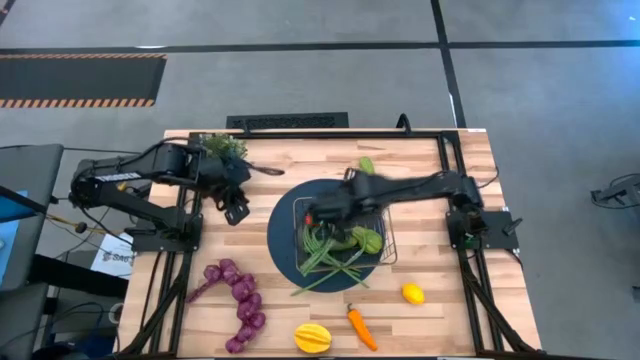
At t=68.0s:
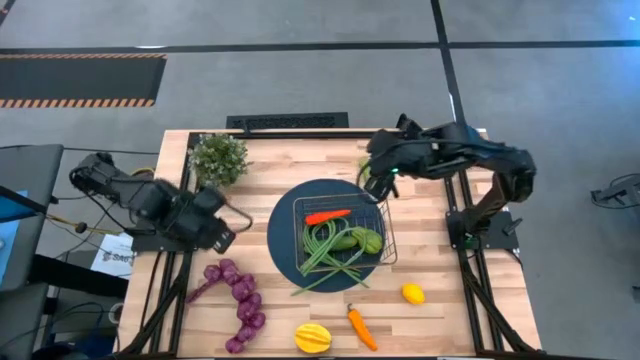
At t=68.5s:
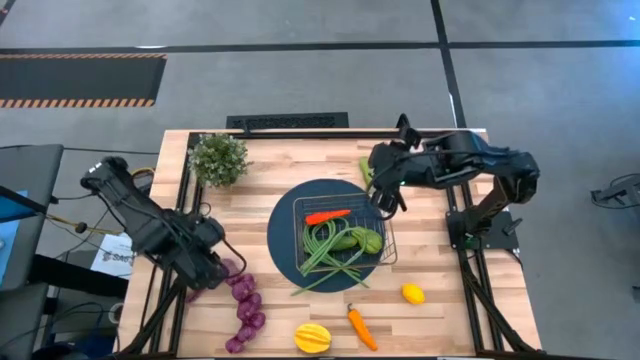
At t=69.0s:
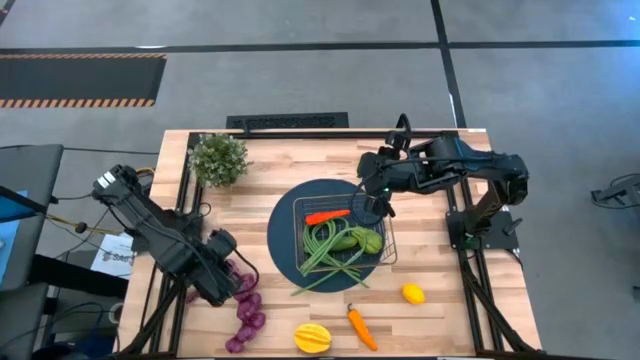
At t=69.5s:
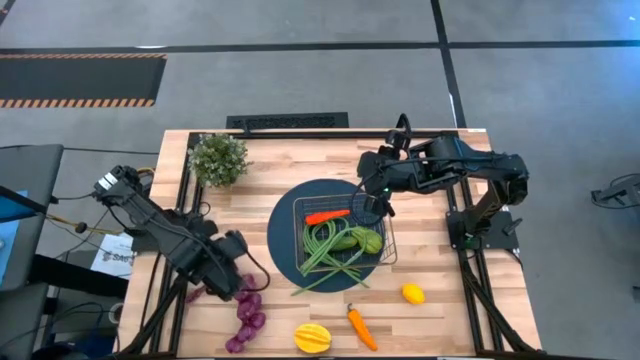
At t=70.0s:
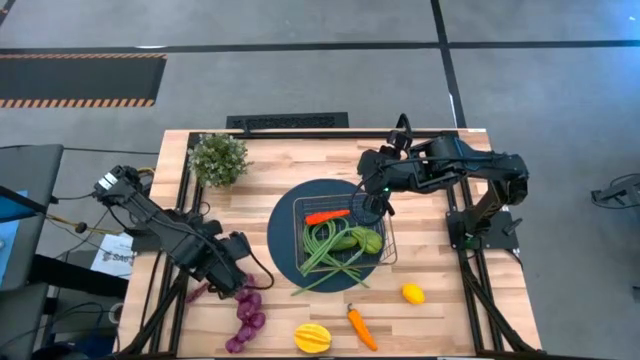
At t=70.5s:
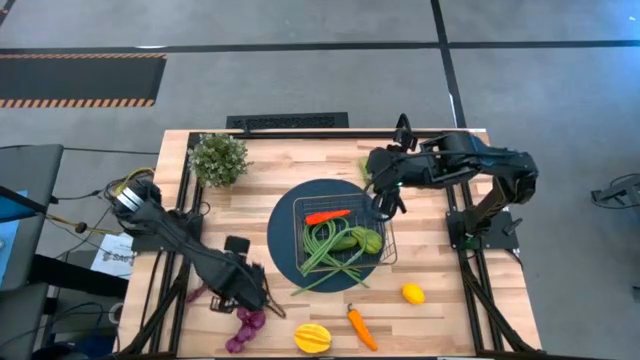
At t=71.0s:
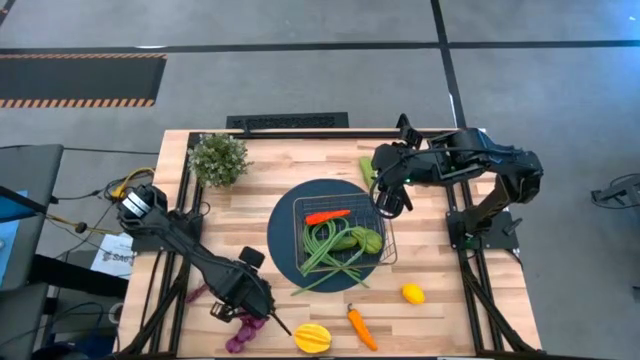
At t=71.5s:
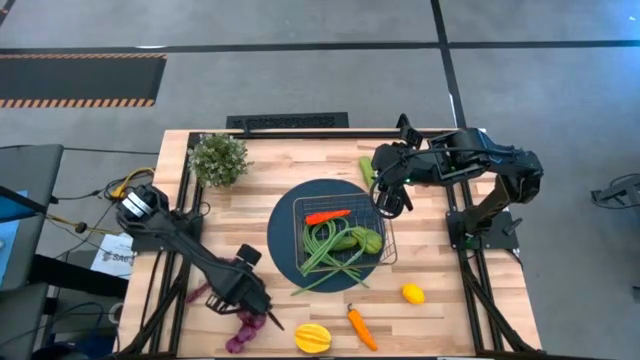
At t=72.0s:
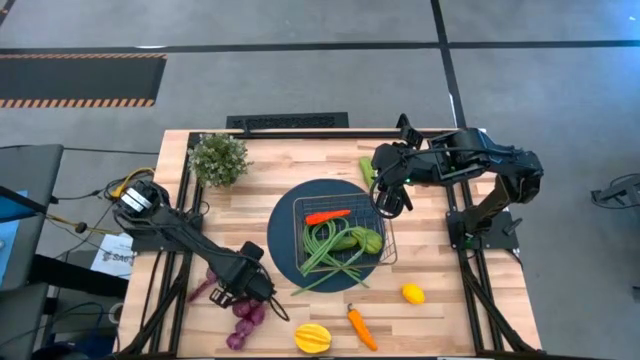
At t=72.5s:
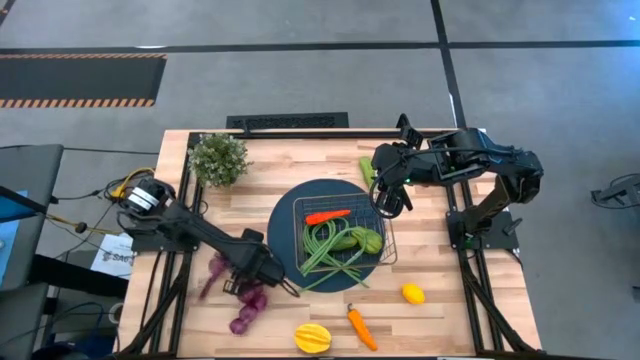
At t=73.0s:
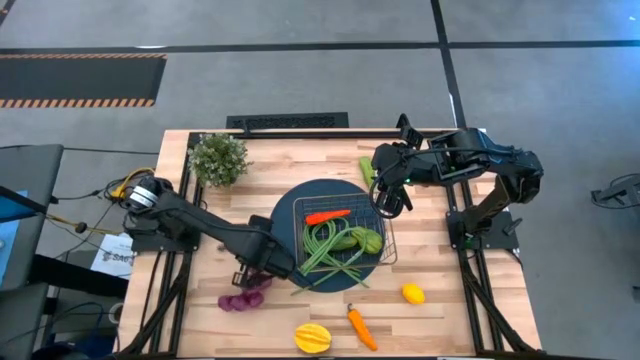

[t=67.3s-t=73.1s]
Task: Build produce basket
Put the purple garlic into the gold wire basket

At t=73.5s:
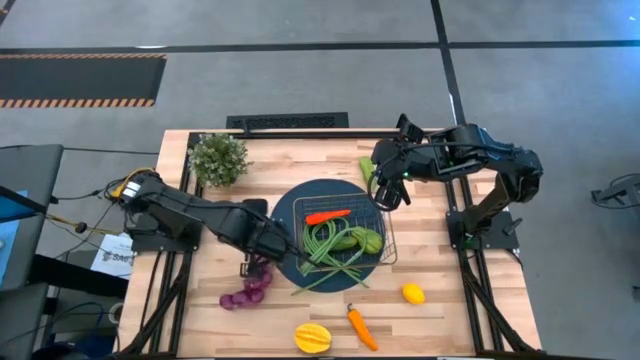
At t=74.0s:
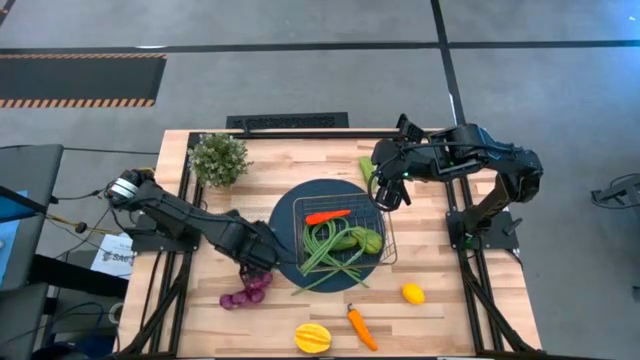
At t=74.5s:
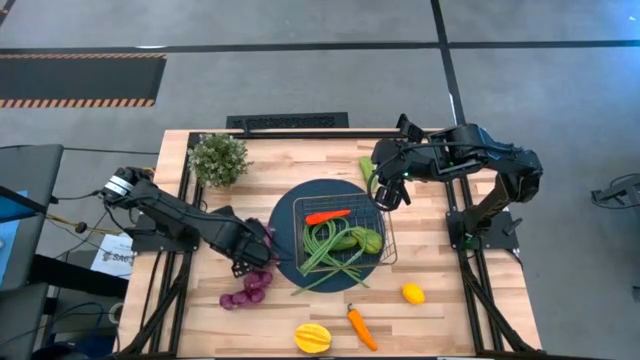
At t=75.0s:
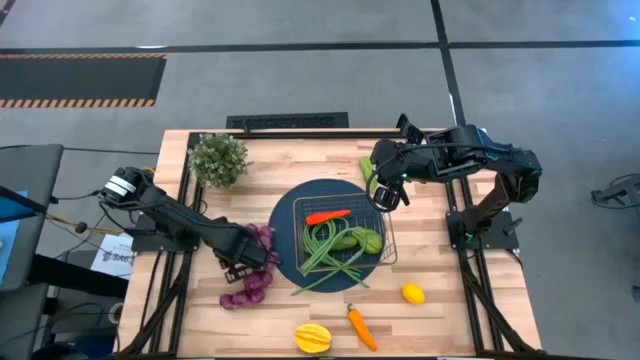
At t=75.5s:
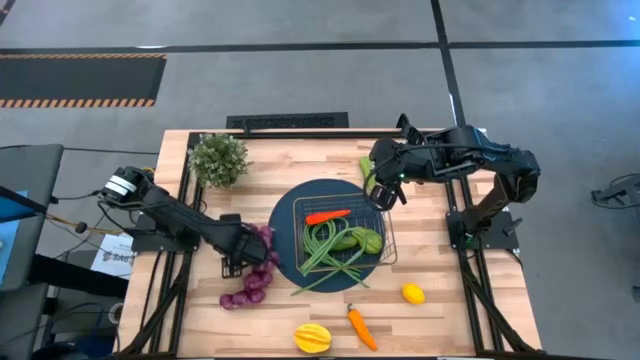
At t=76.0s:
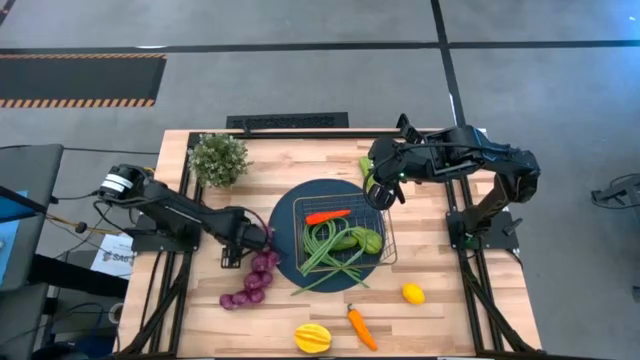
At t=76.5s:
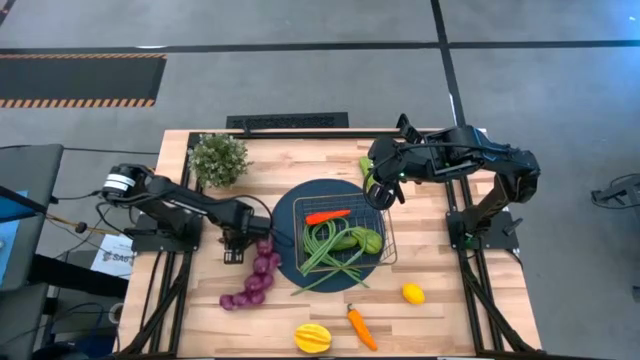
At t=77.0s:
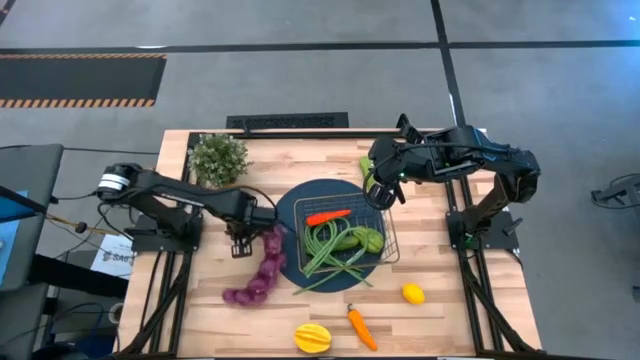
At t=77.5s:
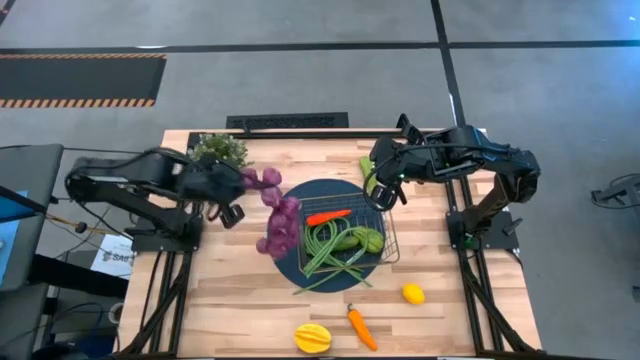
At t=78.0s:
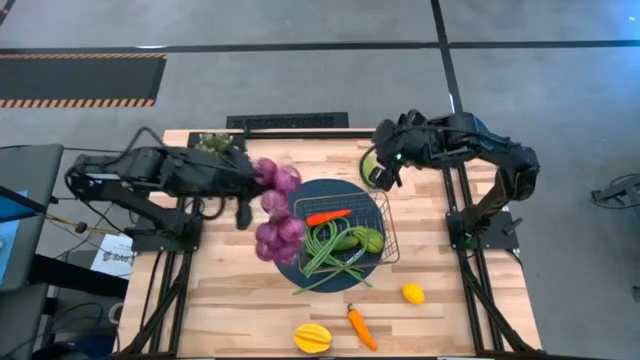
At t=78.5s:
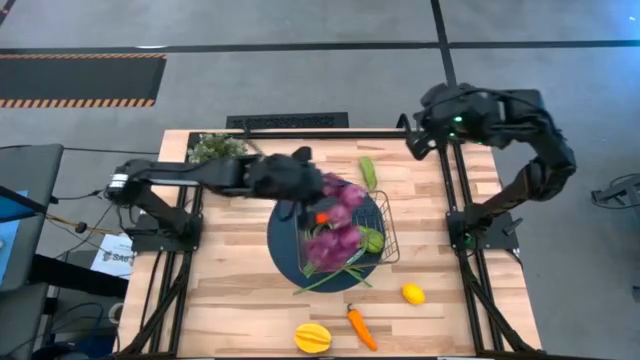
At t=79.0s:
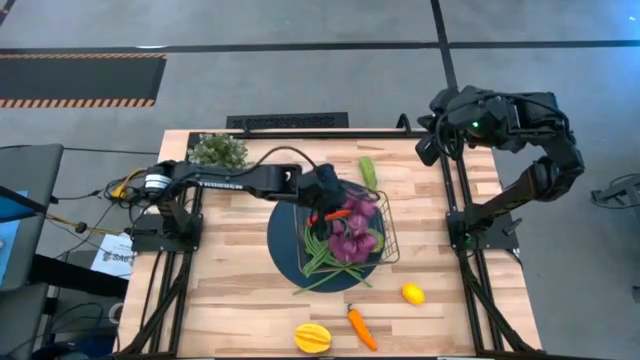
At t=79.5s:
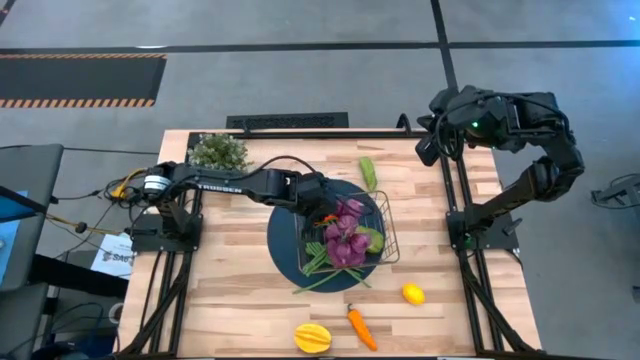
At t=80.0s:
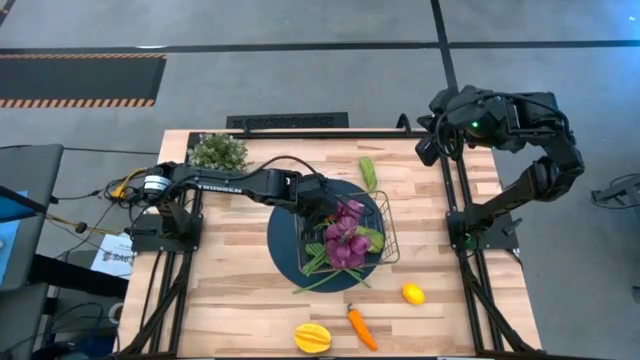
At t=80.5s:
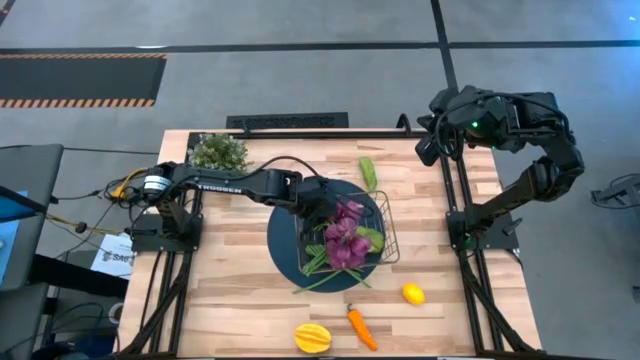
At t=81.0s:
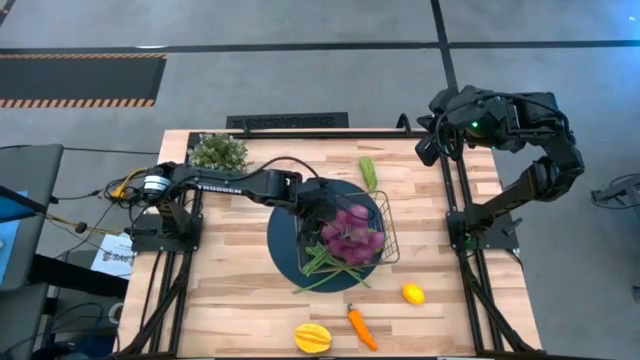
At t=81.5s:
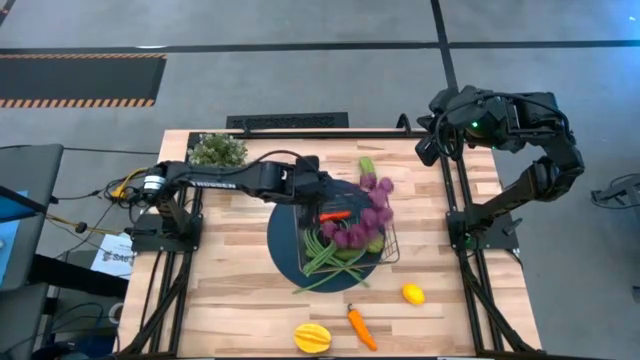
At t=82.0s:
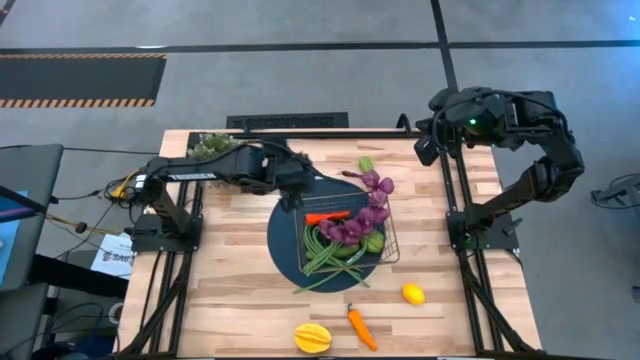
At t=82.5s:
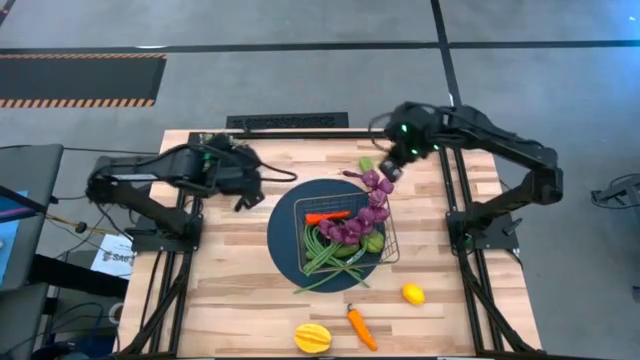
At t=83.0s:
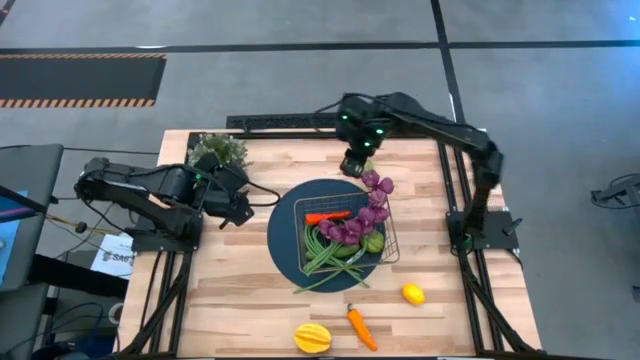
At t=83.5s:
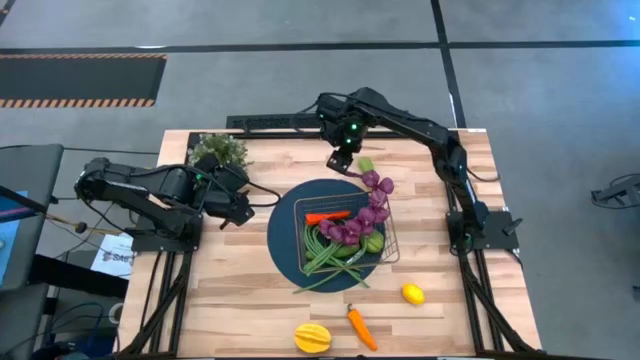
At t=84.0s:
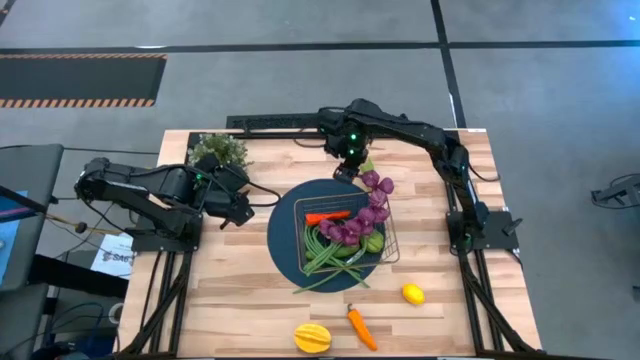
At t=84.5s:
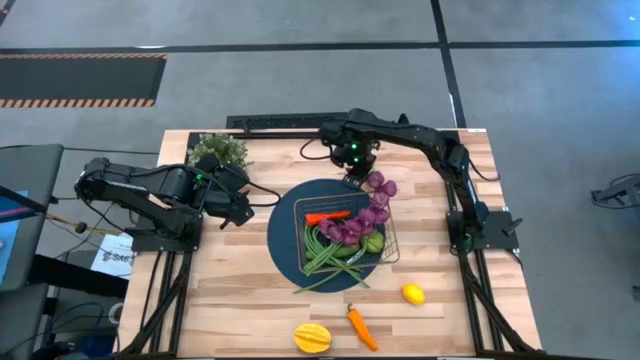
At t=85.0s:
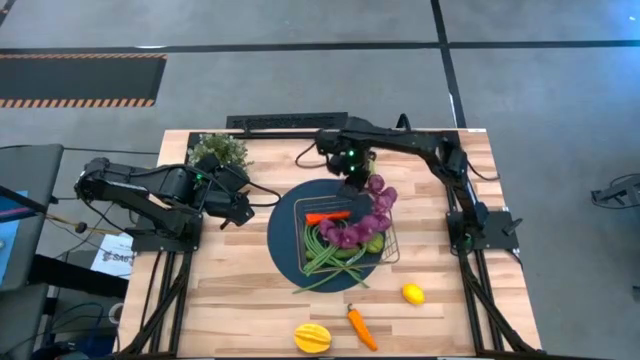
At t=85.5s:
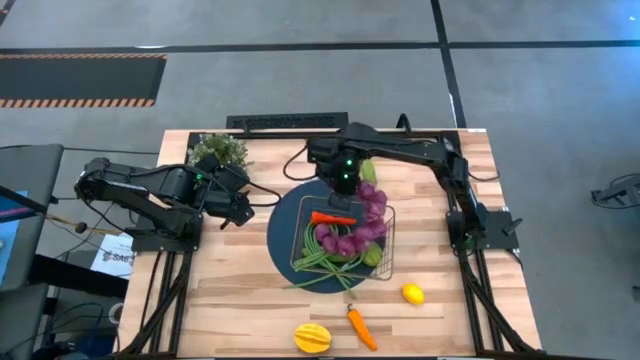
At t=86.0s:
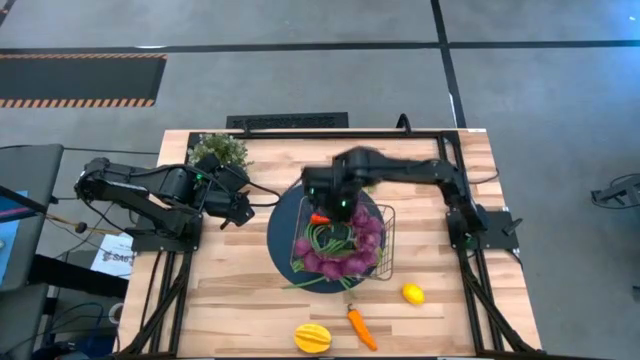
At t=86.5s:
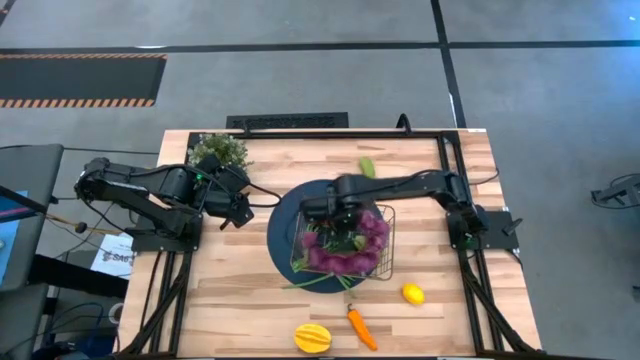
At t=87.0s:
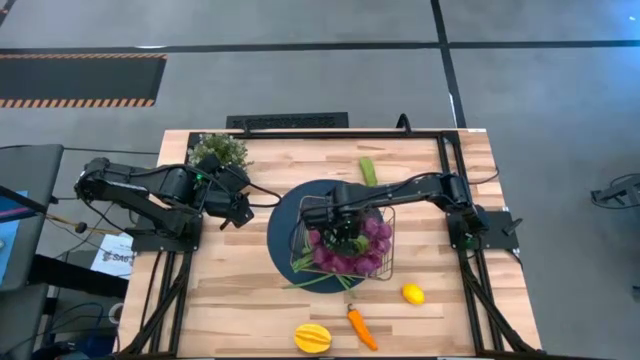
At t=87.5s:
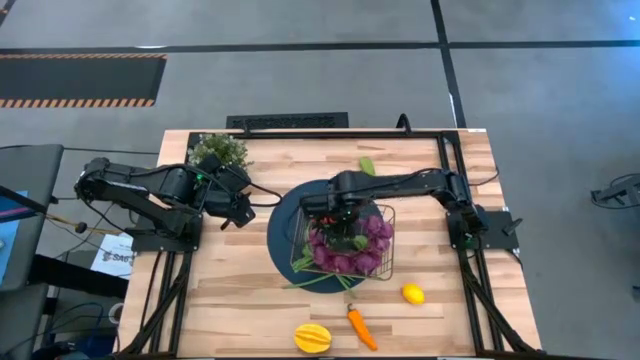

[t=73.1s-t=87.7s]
Put the purple garlic into the gold wire basket
